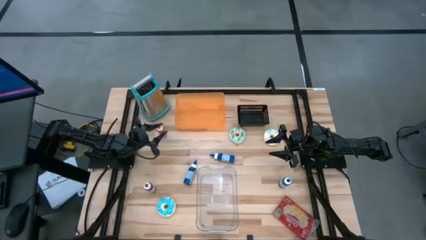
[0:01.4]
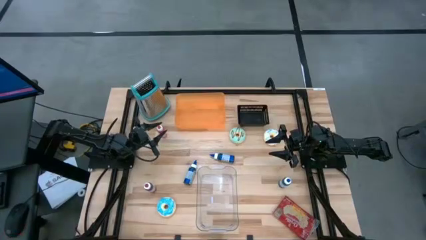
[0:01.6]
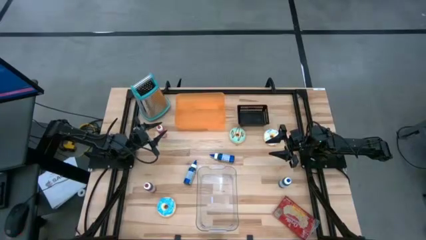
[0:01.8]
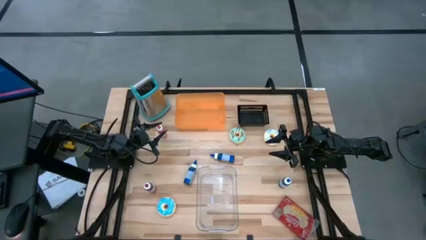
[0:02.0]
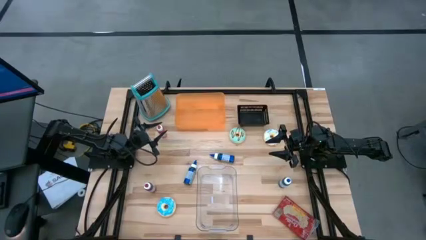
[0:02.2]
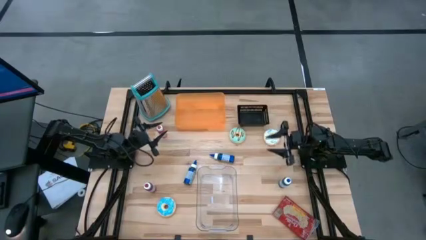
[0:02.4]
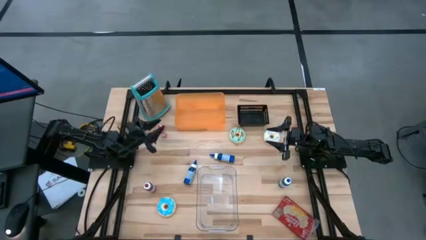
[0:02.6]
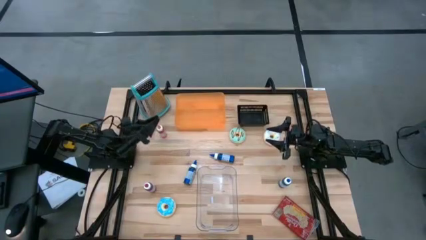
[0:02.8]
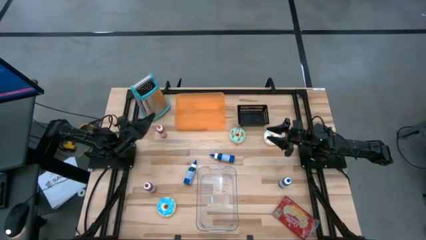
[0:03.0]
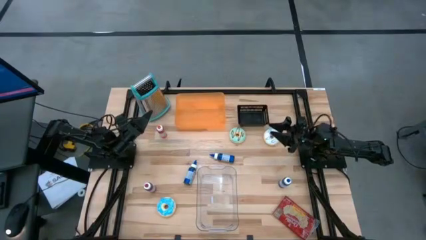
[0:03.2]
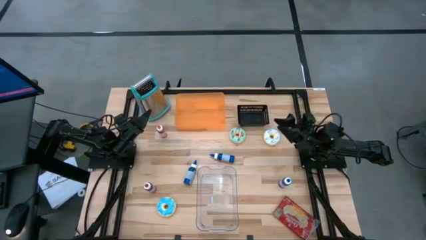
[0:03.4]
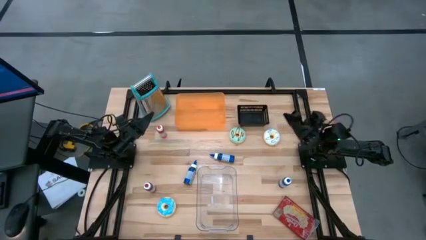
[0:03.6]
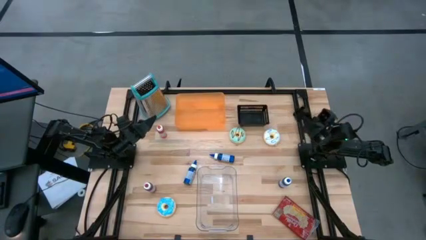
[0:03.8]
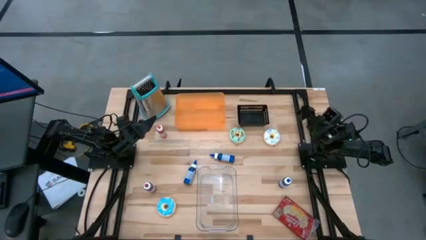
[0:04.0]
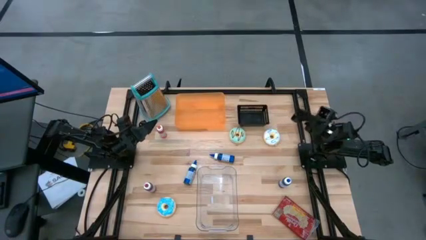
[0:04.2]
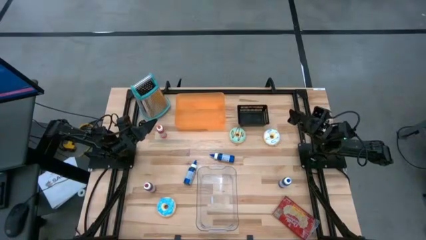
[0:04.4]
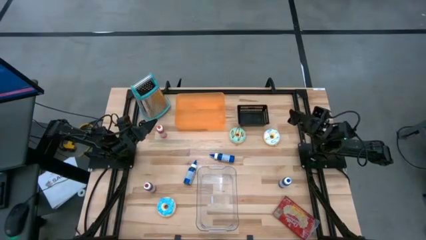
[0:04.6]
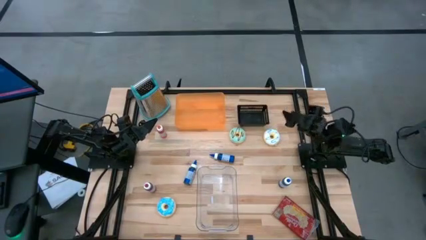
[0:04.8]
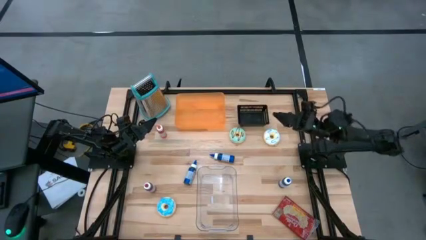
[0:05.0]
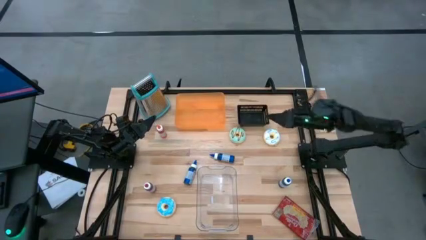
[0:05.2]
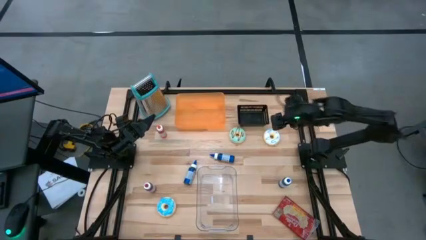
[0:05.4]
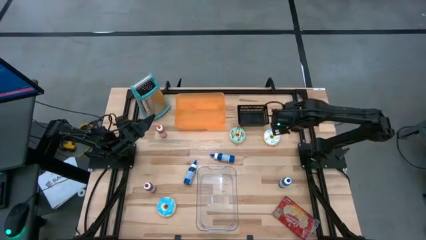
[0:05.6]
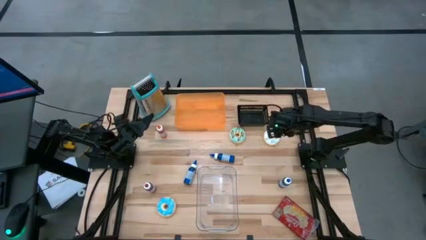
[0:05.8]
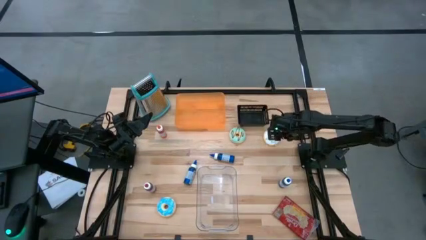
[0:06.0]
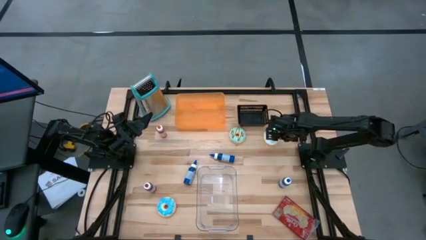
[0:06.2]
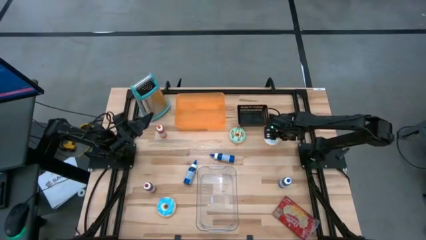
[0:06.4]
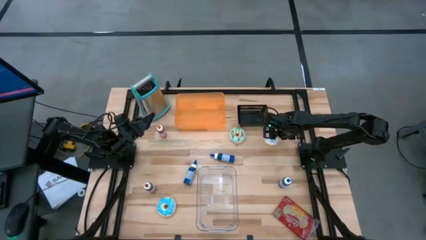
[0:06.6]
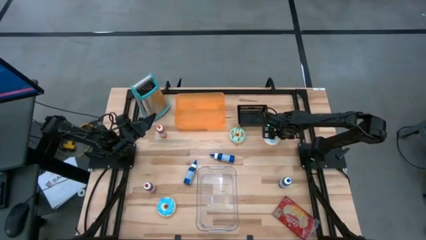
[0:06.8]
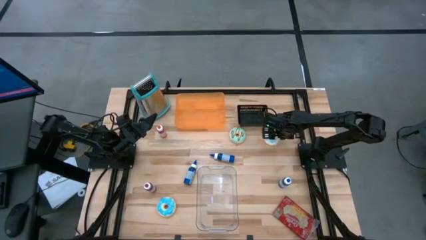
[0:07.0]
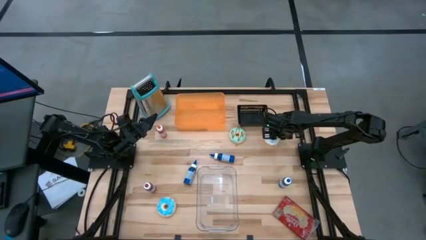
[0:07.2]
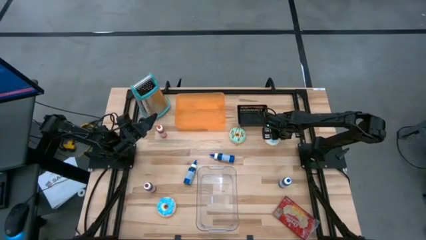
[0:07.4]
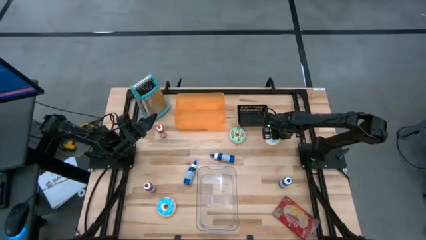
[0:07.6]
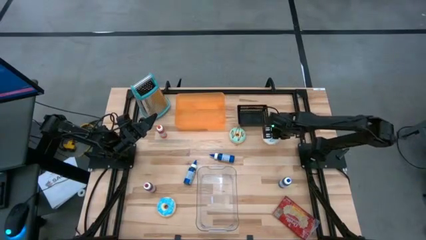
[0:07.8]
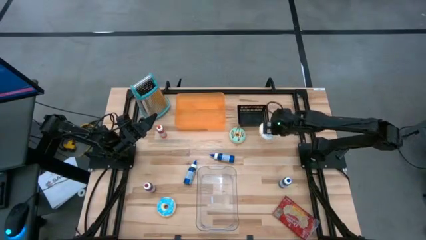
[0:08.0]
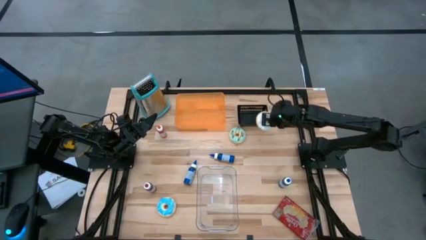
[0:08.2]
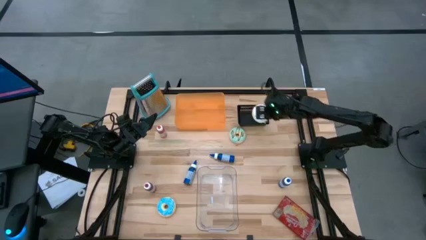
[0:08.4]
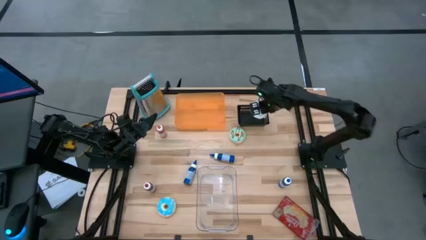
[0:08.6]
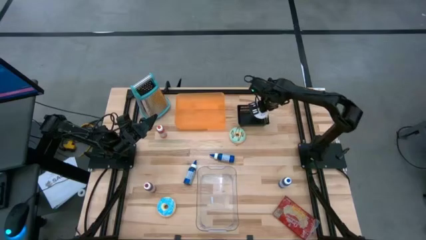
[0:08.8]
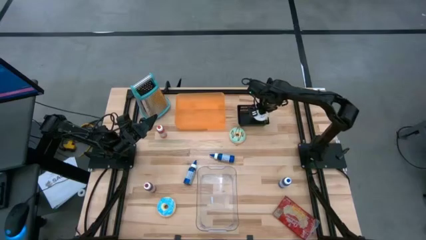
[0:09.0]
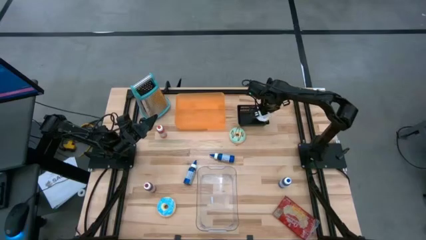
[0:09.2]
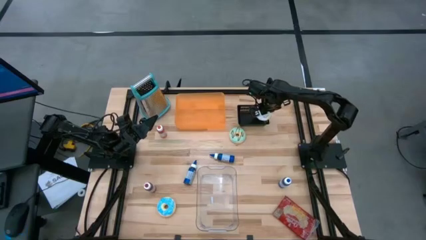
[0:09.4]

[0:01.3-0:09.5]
Put the white doughnut into the black bin

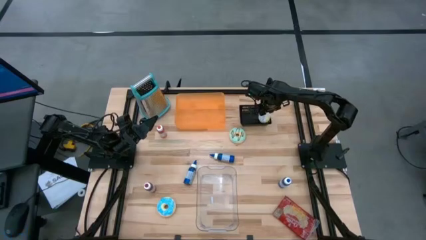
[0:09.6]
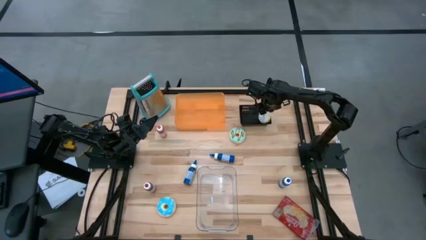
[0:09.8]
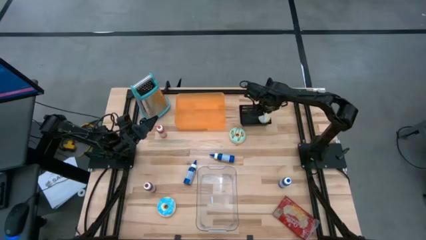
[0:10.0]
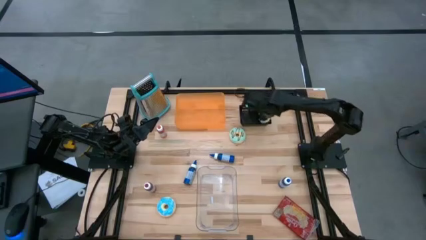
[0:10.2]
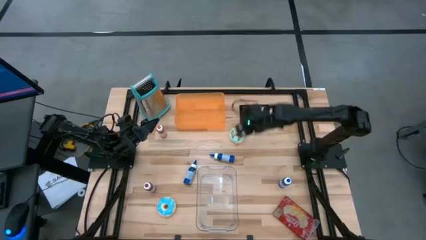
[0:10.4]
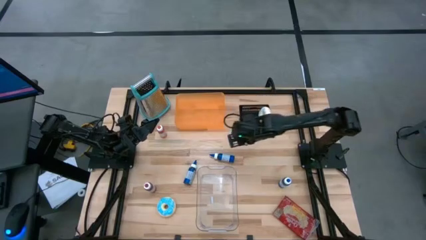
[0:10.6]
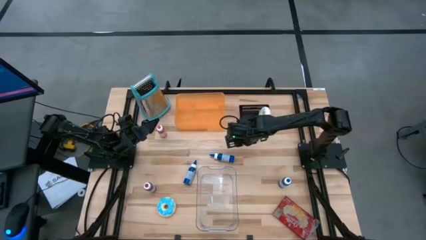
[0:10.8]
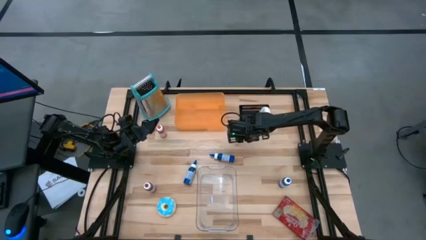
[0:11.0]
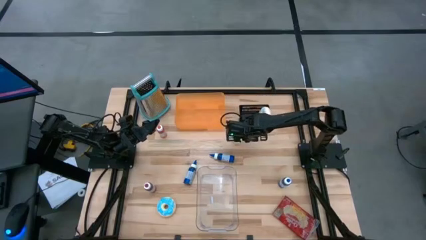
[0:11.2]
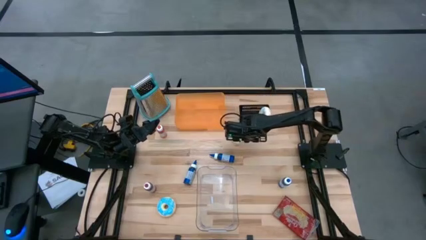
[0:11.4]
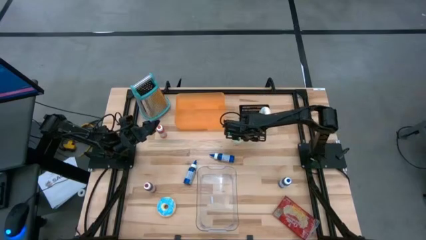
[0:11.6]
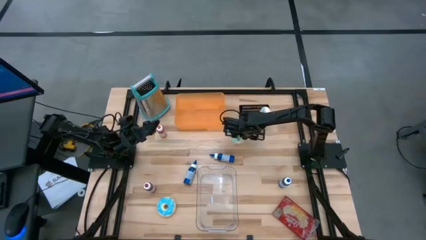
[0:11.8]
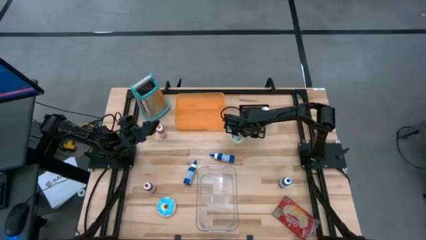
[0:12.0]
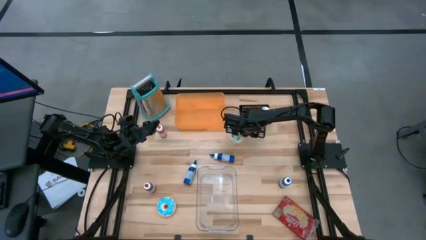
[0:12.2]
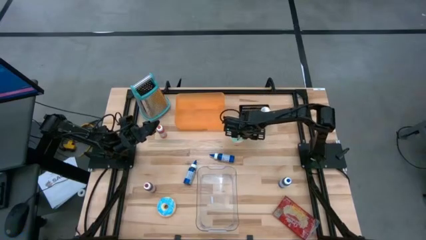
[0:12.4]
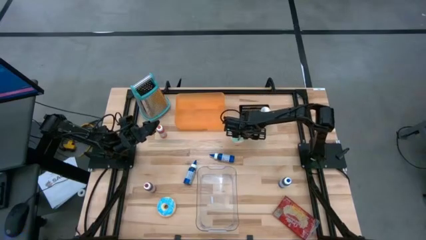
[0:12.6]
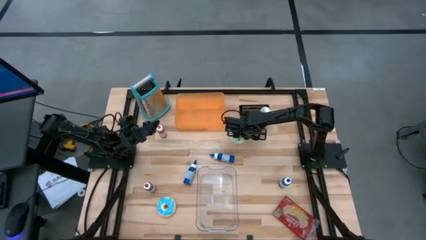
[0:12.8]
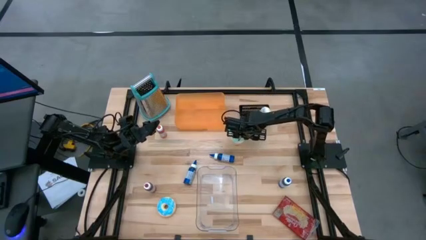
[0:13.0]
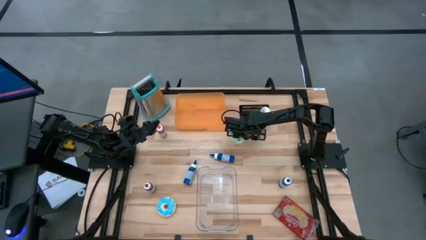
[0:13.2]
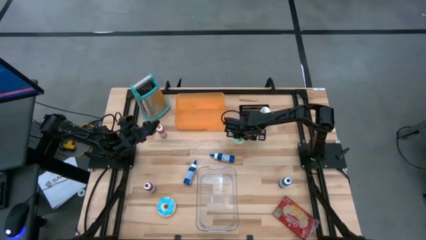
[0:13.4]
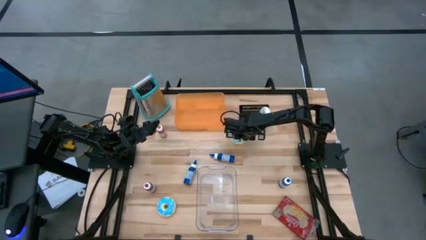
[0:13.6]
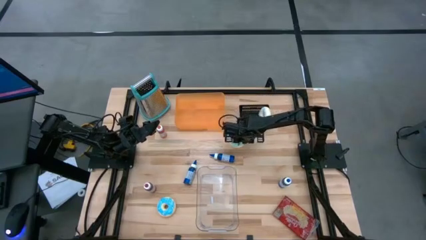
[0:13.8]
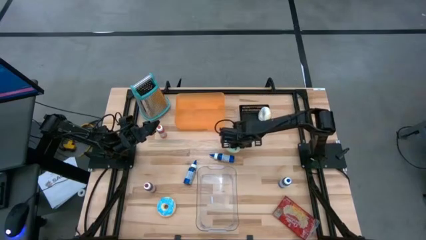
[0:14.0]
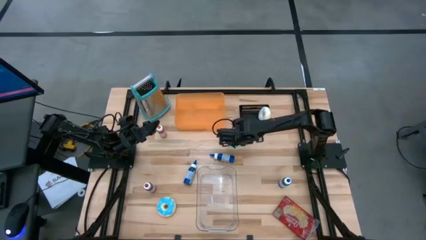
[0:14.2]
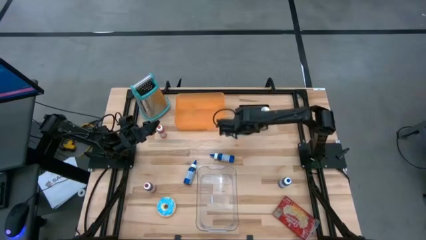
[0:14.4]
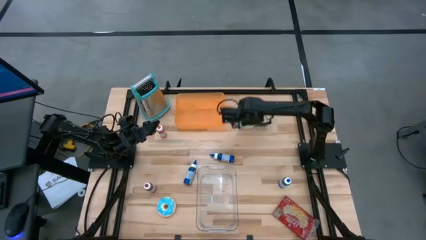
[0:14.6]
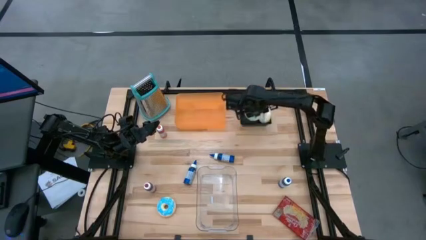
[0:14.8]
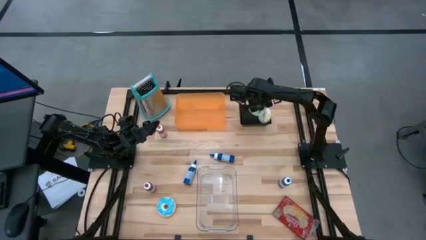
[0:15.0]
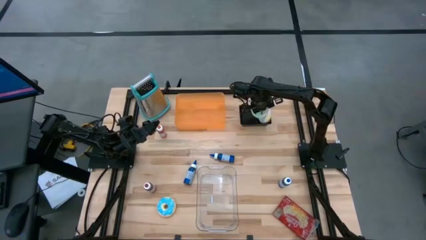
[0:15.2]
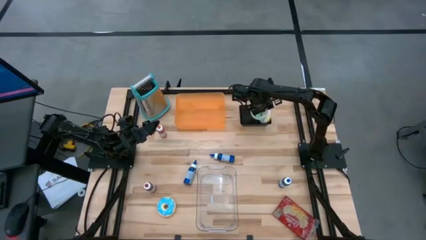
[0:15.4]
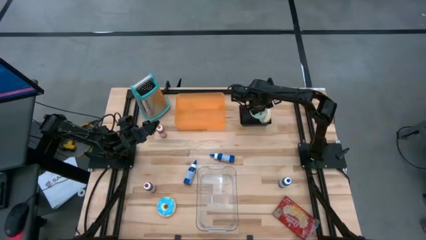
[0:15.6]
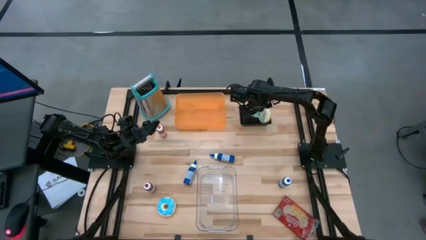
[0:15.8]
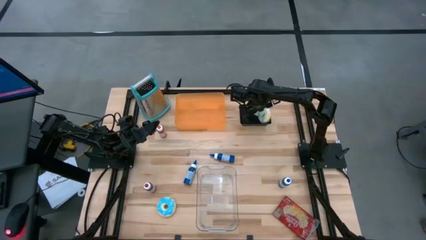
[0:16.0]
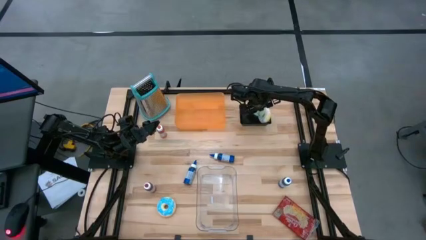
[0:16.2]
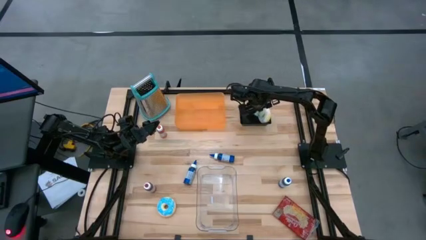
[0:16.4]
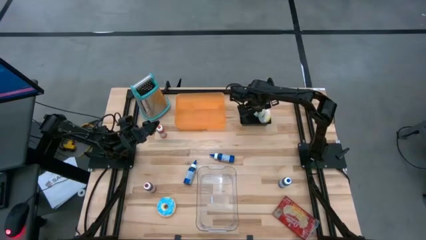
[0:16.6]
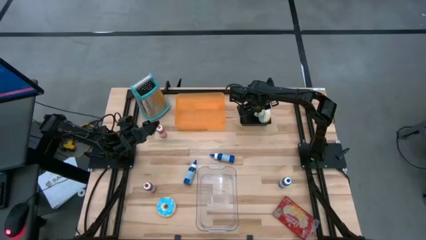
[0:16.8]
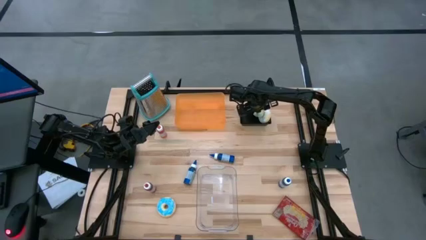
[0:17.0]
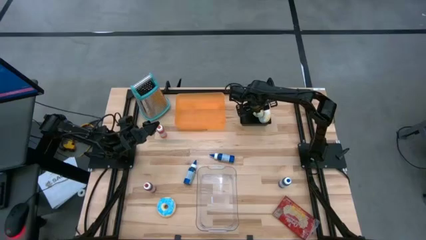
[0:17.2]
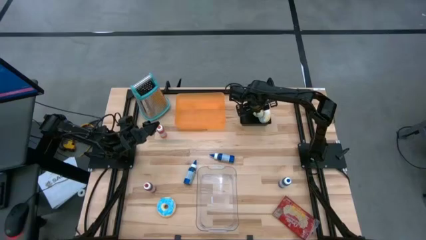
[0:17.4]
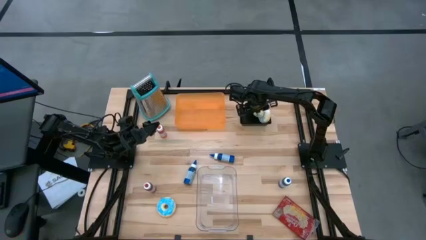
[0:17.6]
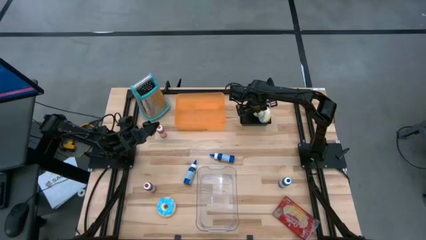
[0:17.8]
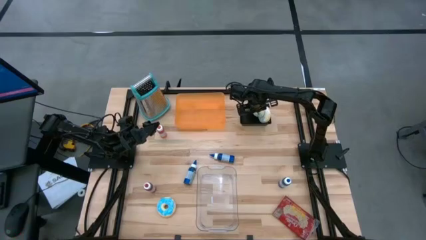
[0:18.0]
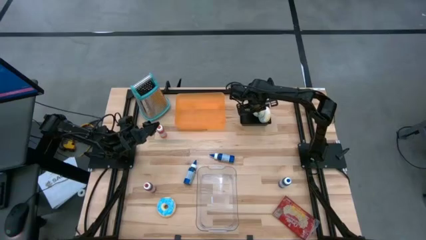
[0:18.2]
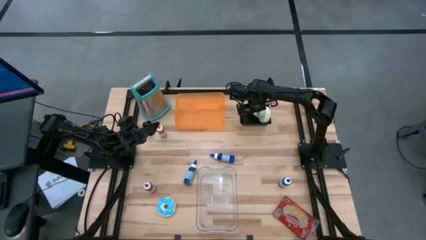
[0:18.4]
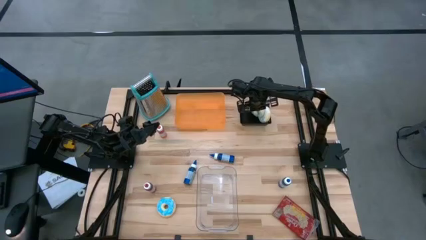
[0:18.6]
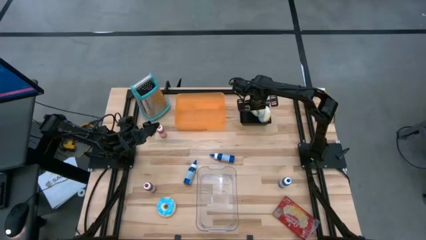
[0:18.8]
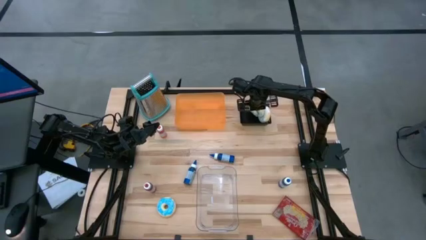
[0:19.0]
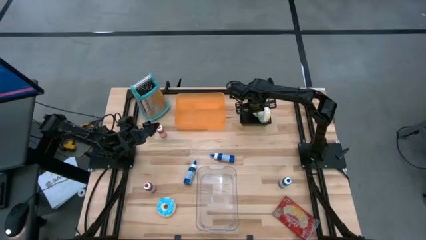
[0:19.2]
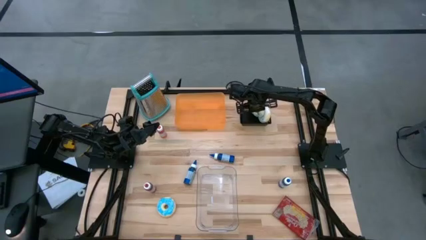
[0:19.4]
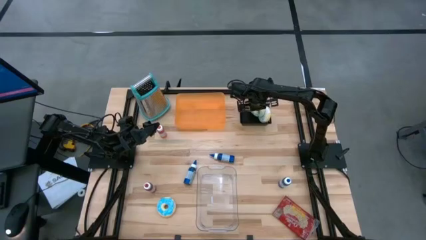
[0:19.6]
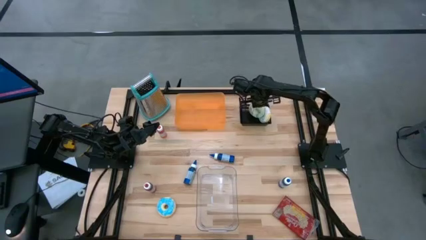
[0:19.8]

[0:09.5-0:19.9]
Put the light blue doughnut into the black bin
